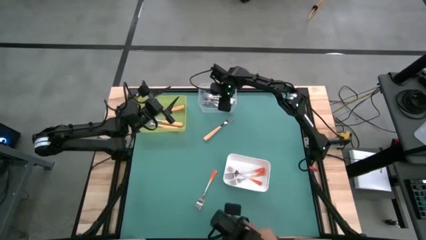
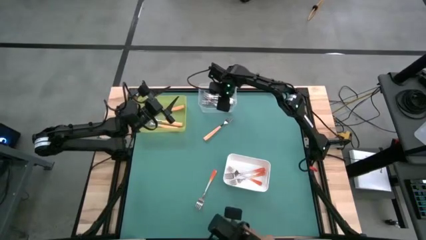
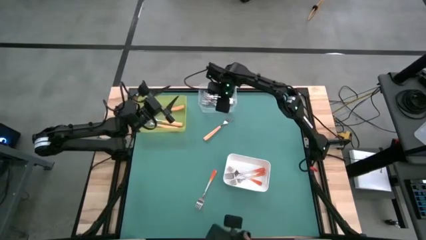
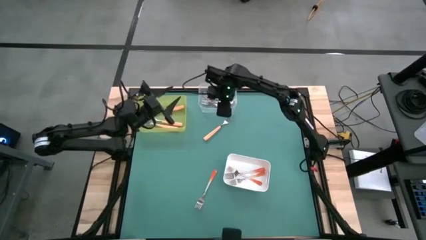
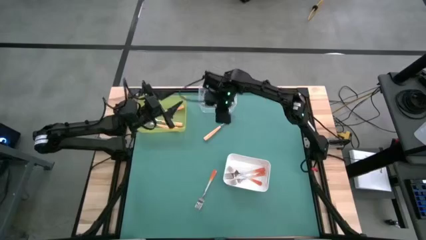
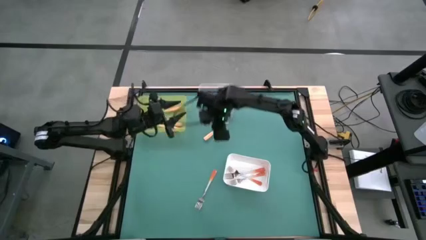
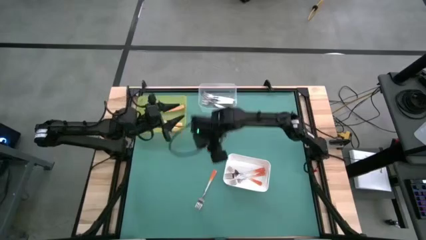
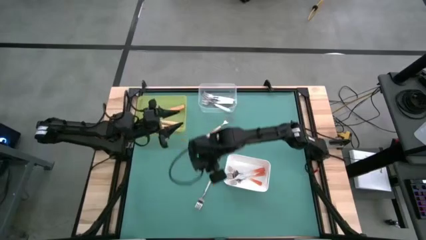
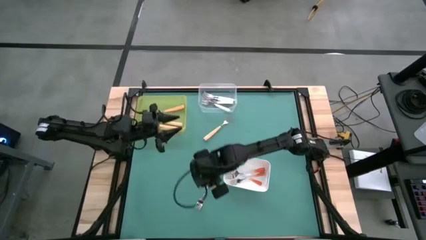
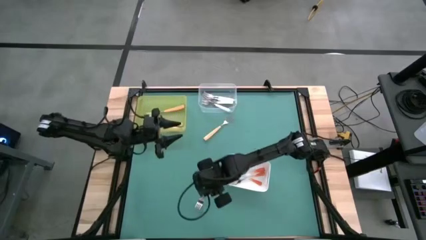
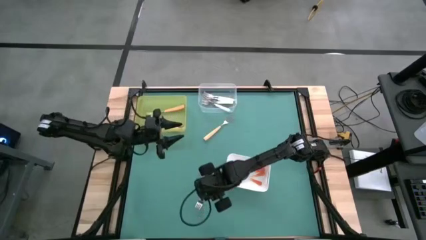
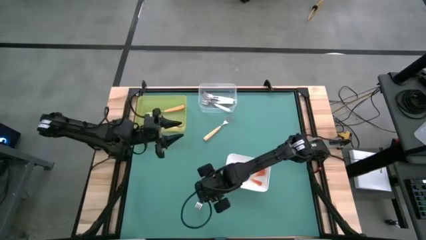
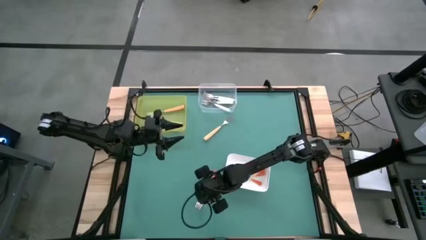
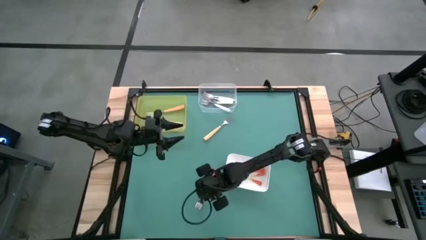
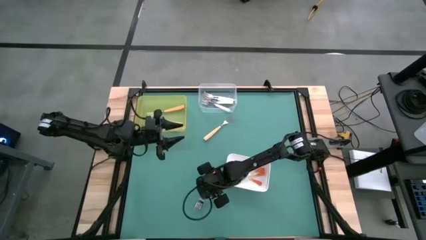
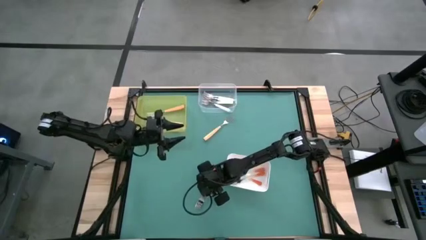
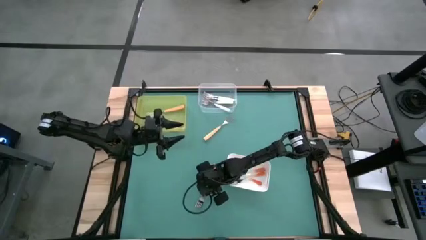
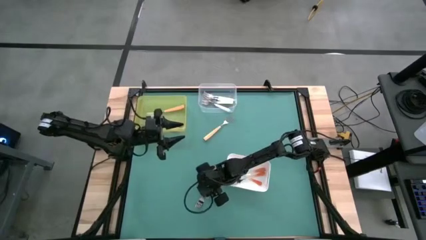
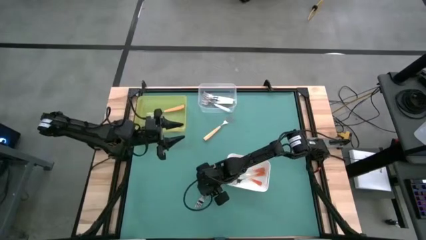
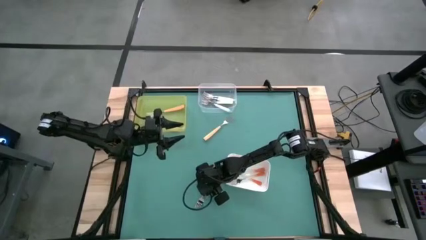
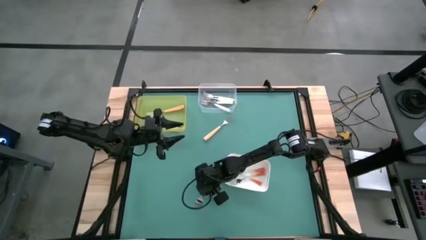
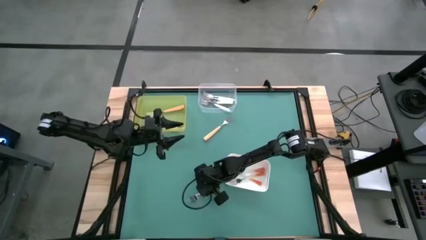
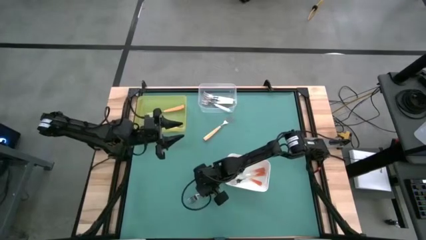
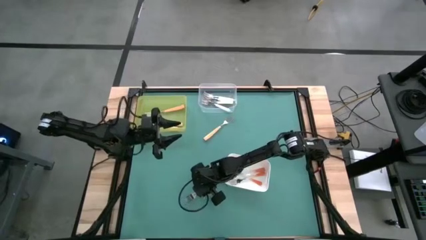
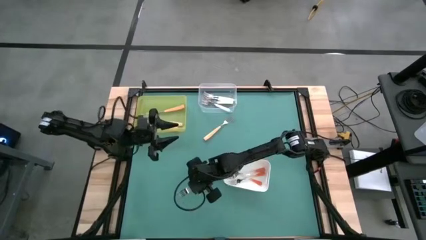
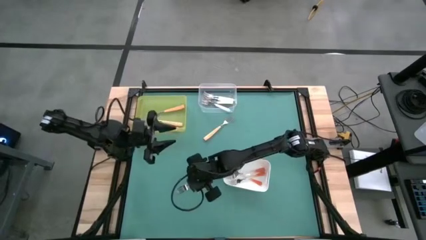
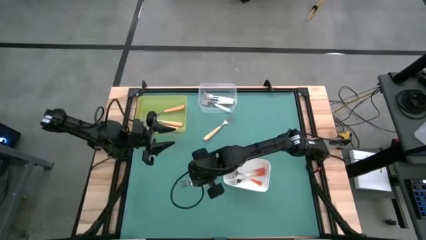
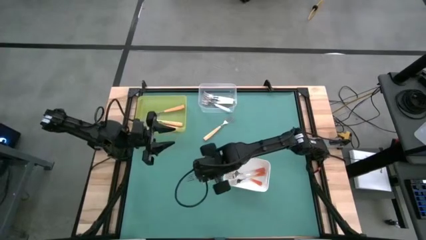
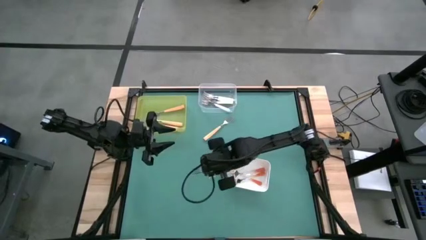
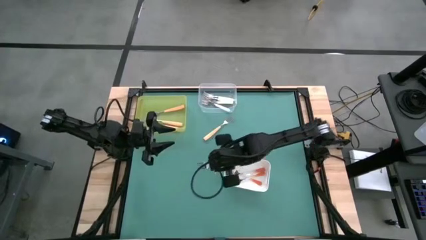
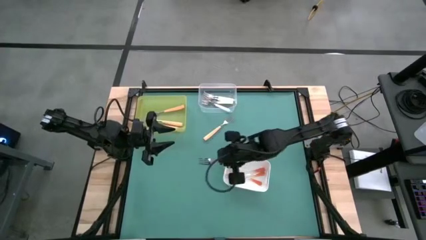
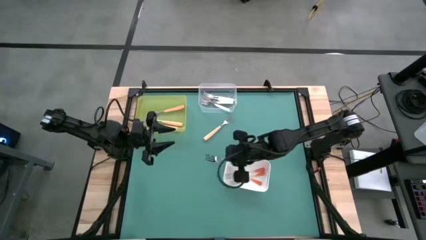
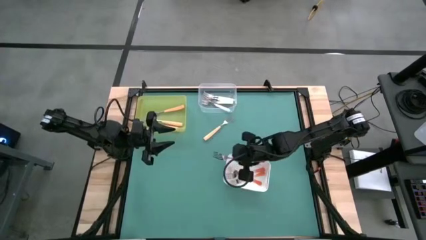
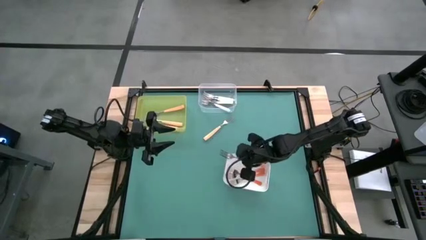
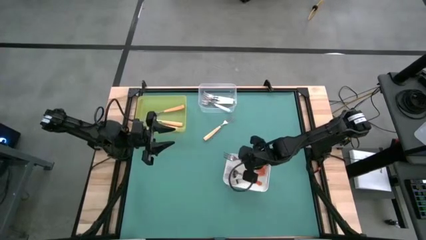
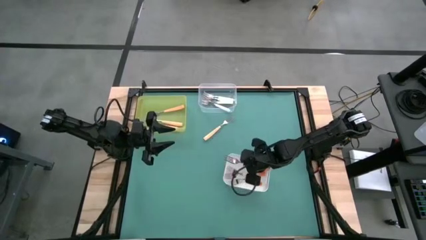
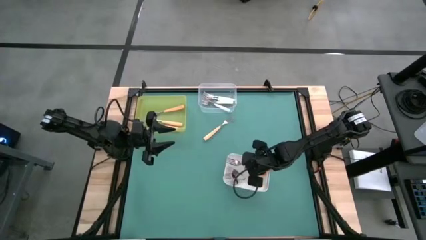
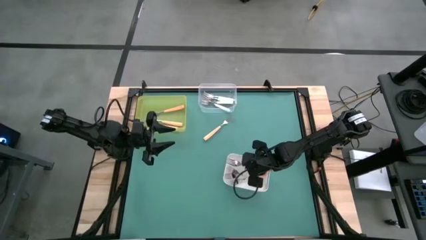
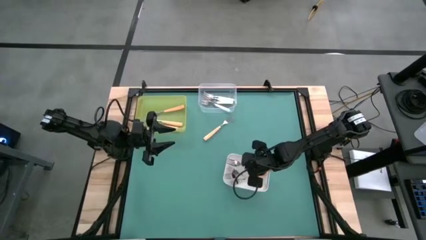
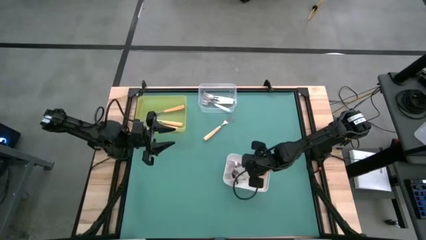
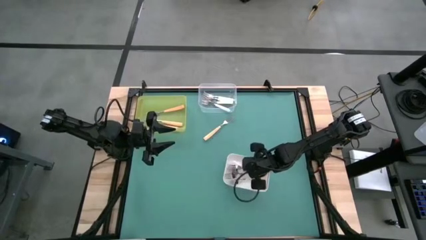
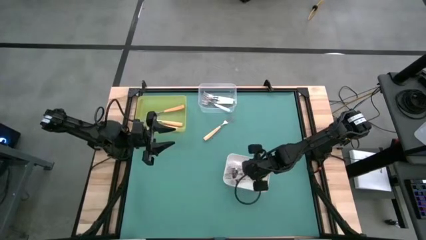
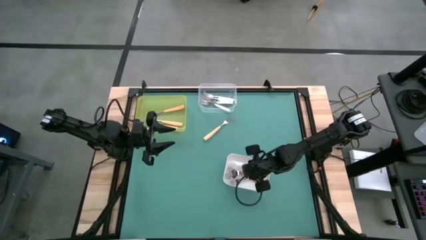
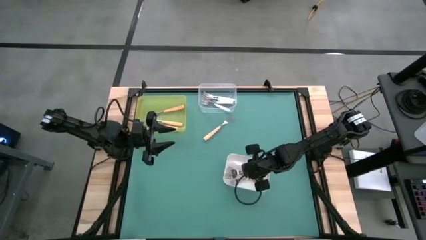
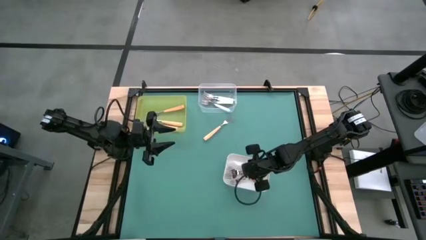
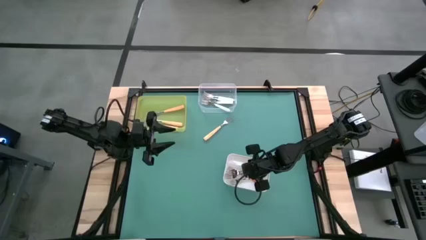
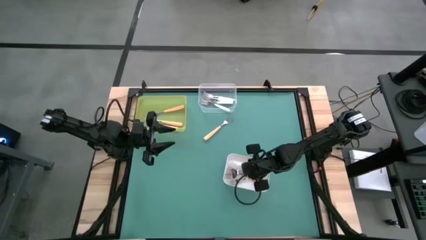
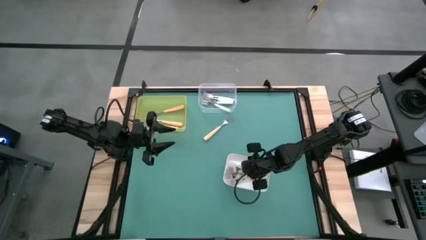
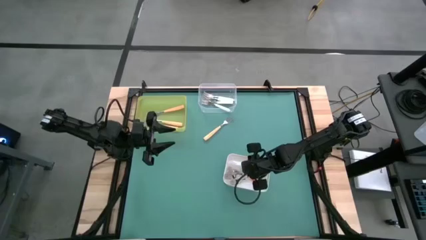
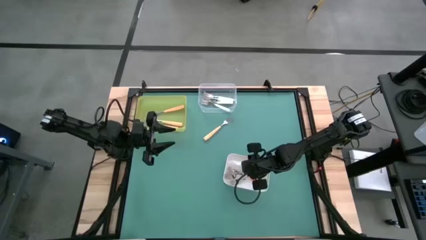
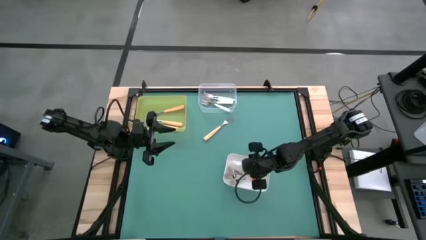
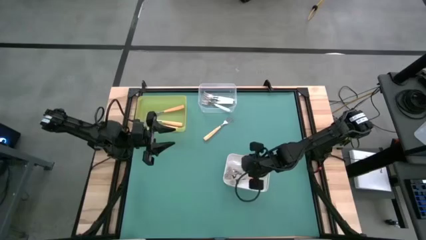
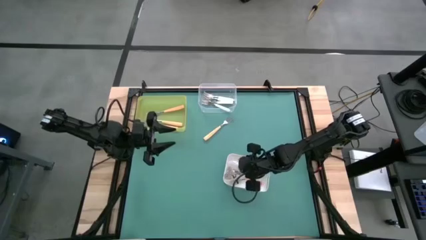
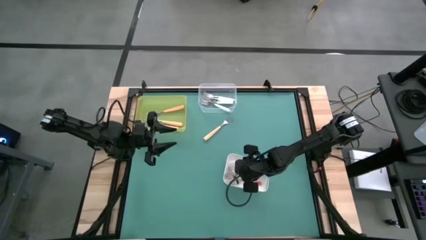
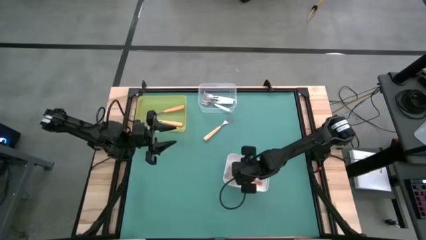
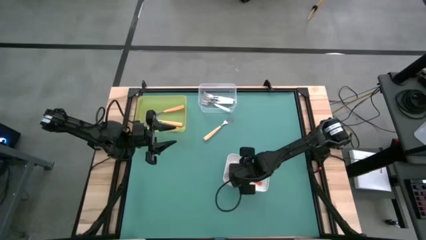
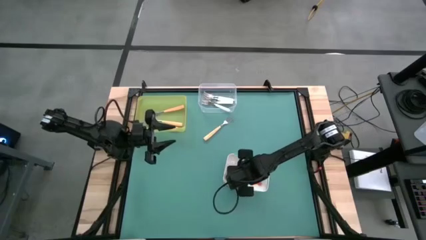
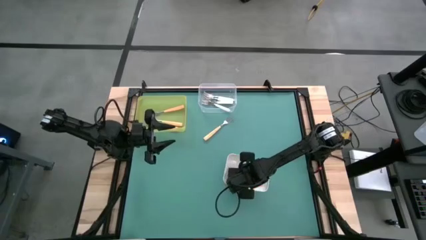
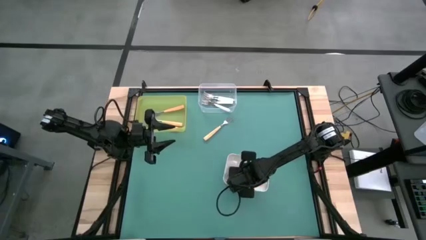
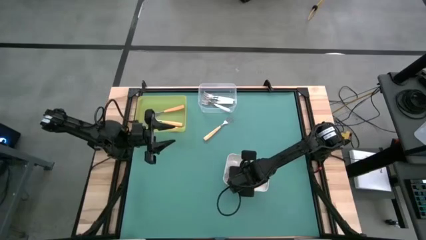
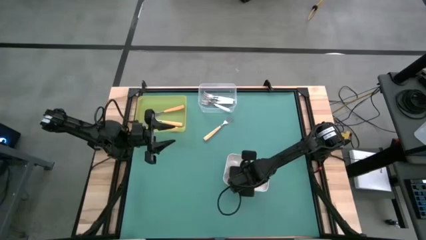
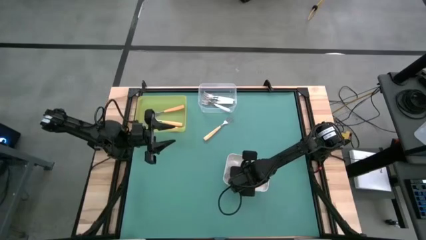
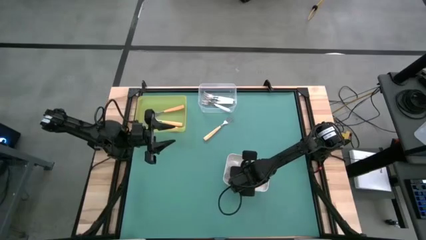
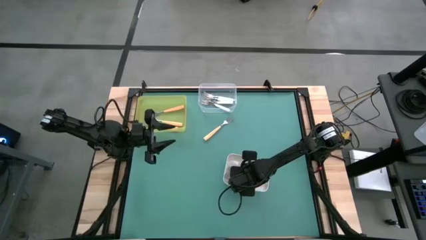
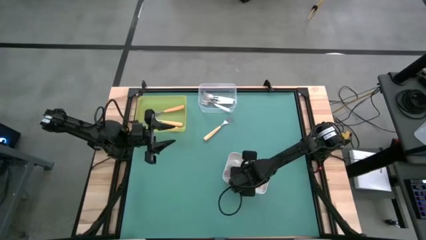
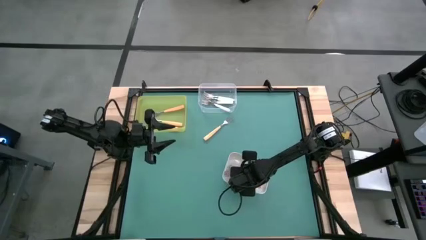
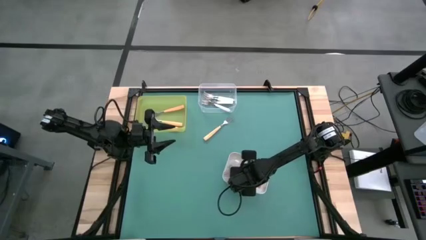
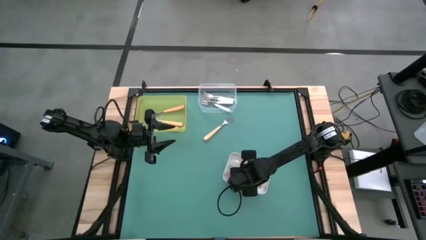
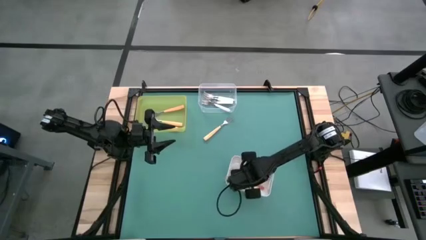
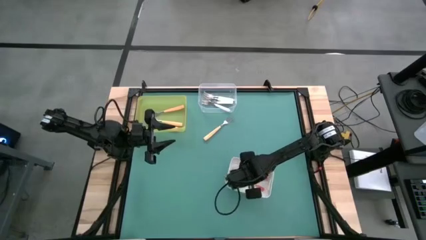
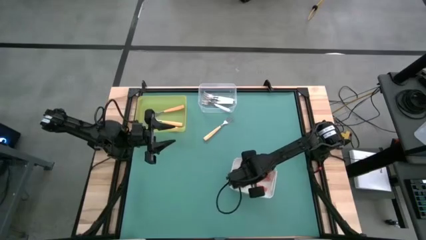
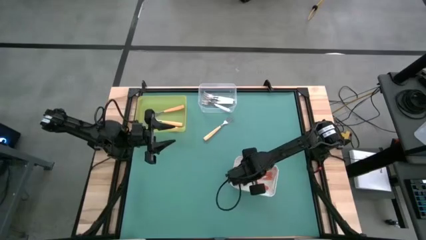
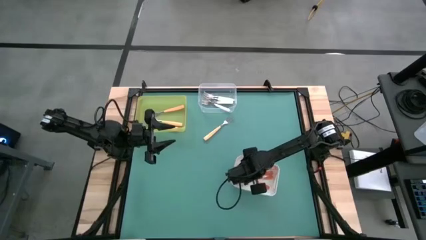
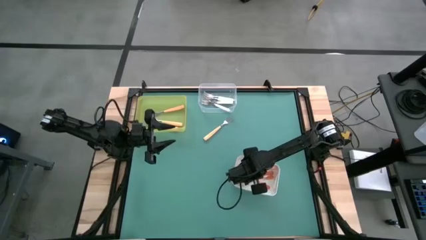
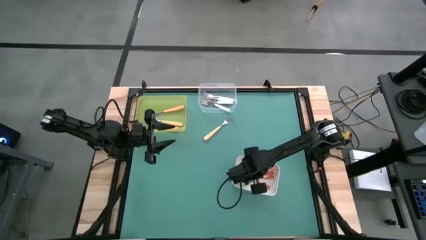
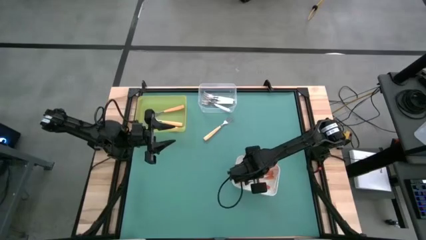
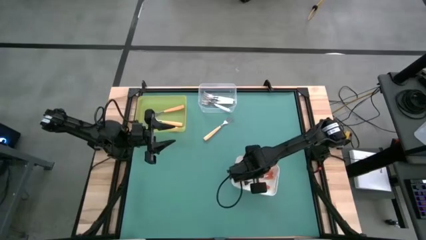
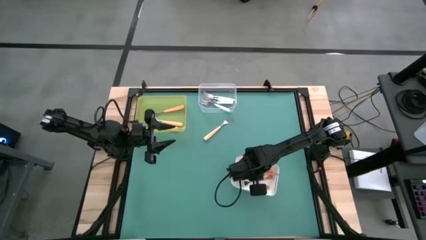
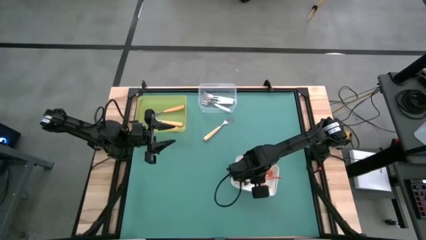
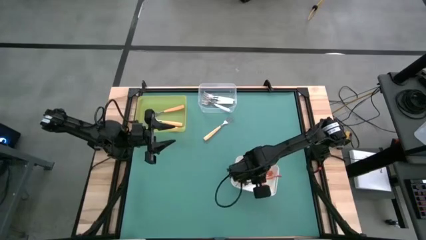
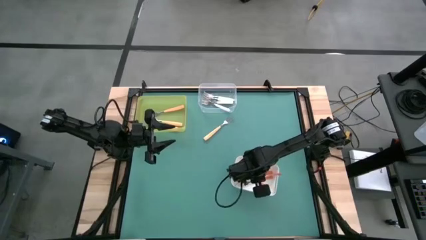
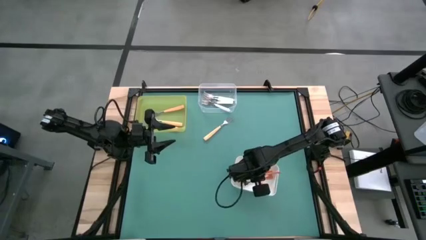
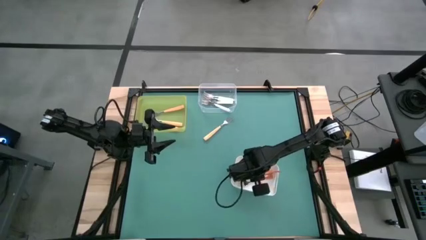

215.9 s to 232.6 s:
Task: Sort silverware by color (type)
Put the orange fork into the white bin
